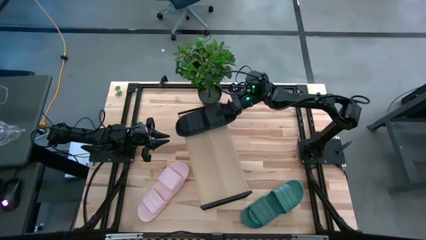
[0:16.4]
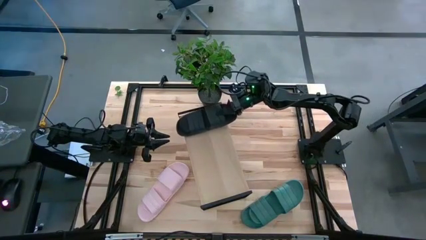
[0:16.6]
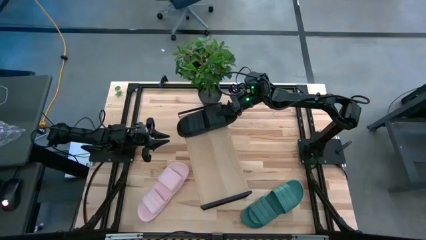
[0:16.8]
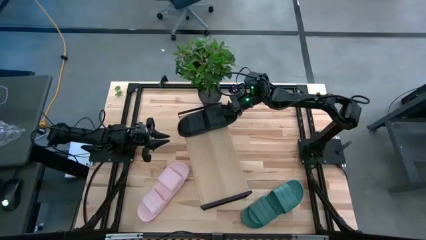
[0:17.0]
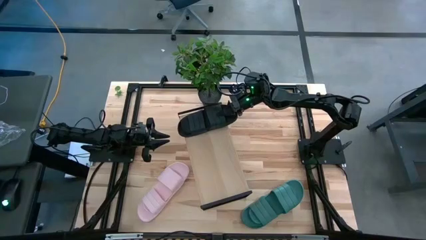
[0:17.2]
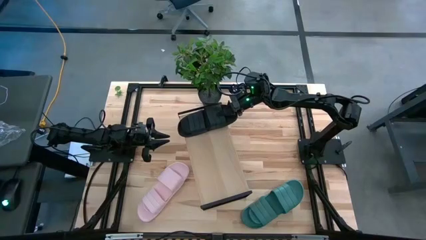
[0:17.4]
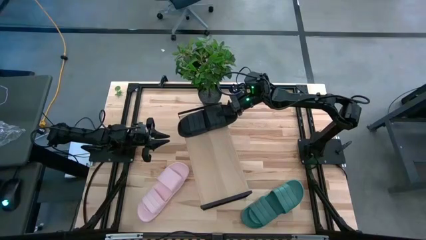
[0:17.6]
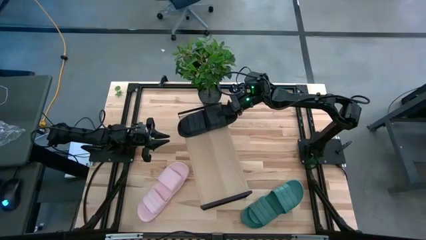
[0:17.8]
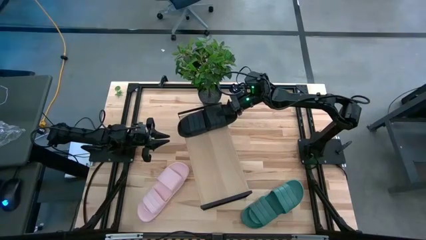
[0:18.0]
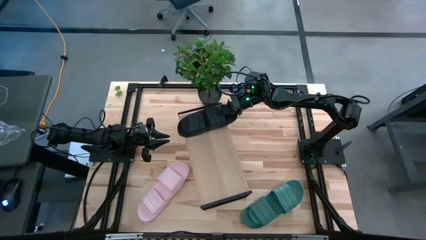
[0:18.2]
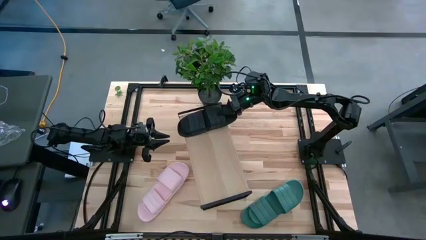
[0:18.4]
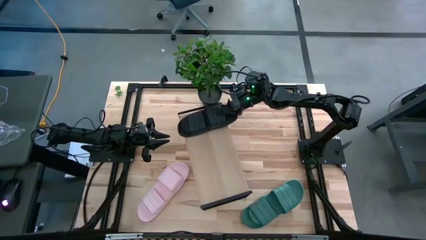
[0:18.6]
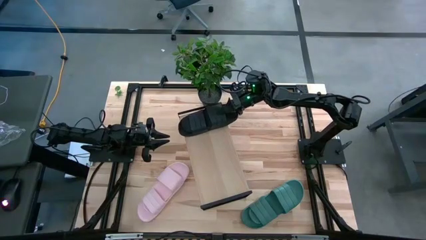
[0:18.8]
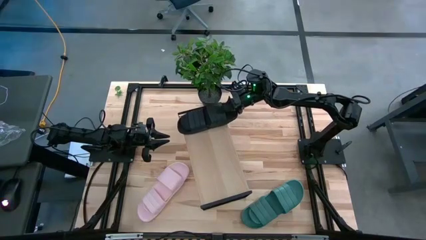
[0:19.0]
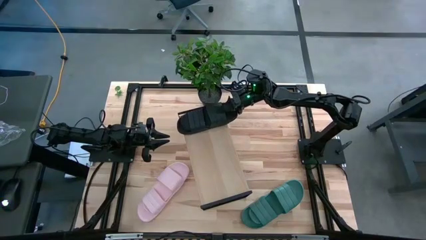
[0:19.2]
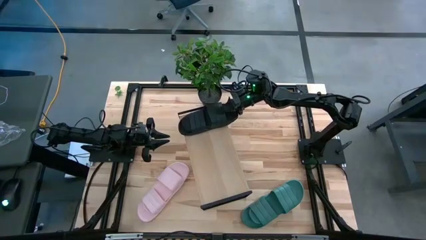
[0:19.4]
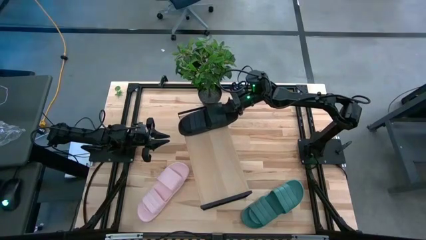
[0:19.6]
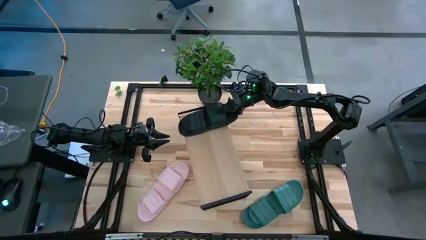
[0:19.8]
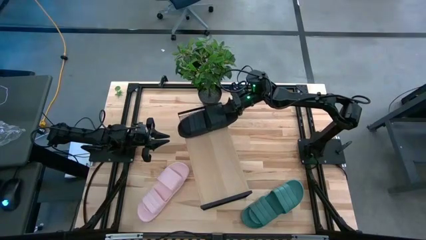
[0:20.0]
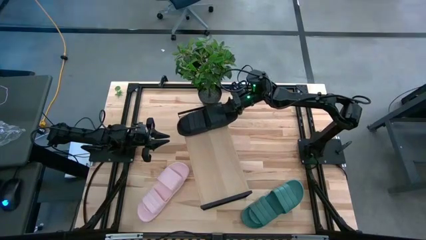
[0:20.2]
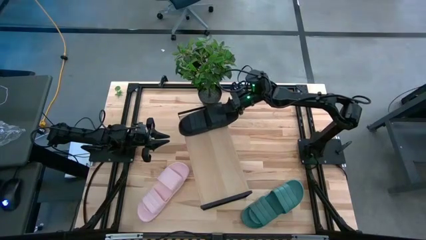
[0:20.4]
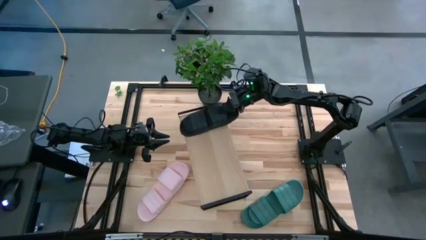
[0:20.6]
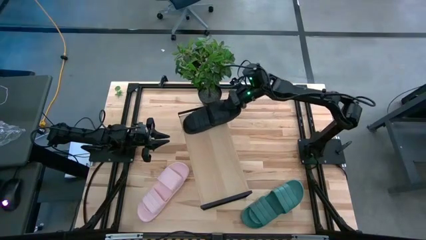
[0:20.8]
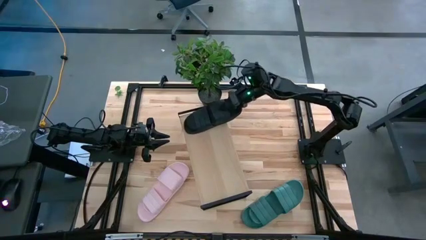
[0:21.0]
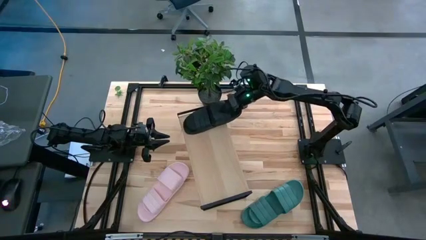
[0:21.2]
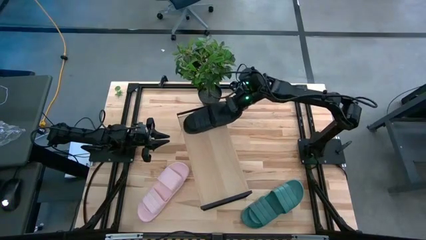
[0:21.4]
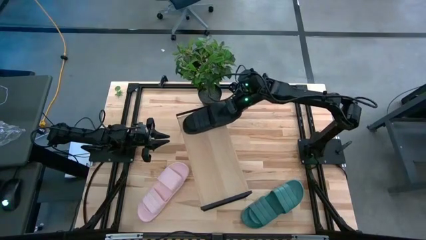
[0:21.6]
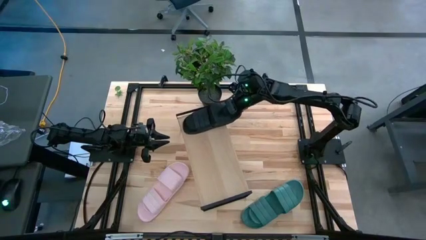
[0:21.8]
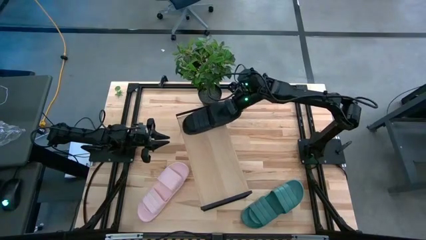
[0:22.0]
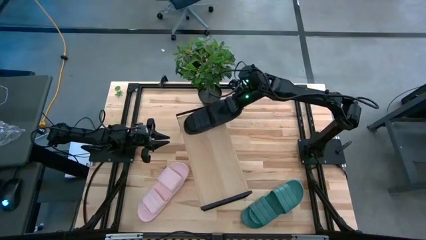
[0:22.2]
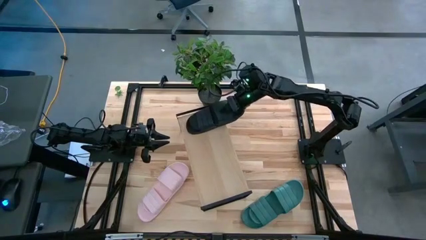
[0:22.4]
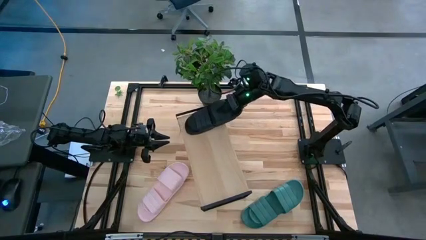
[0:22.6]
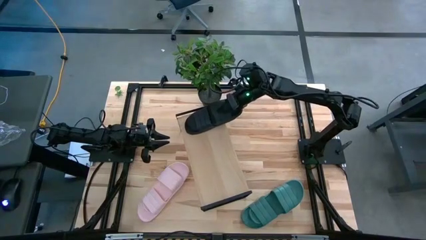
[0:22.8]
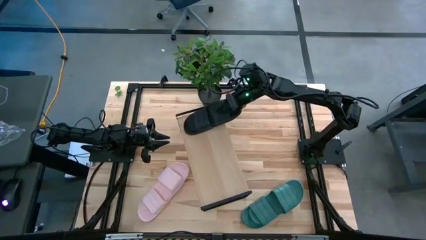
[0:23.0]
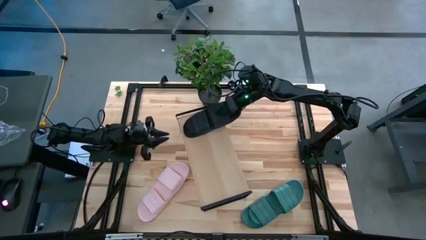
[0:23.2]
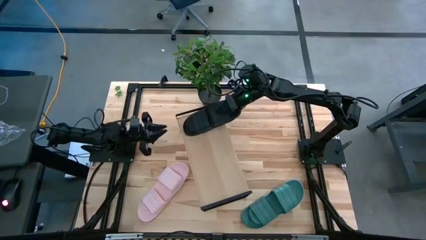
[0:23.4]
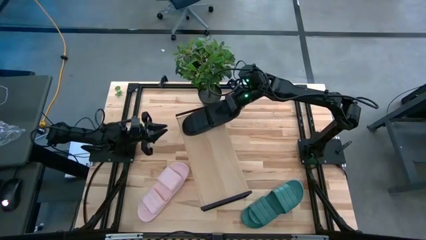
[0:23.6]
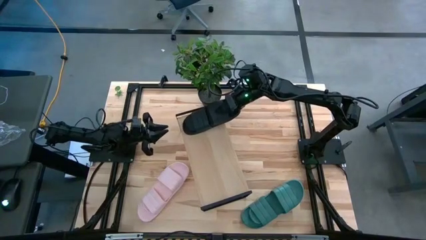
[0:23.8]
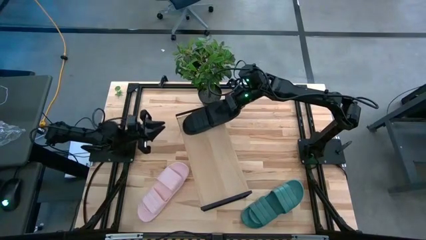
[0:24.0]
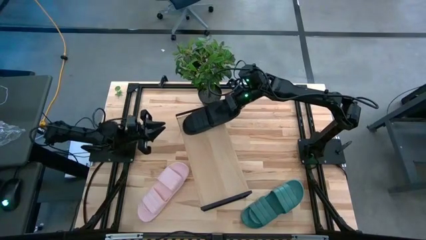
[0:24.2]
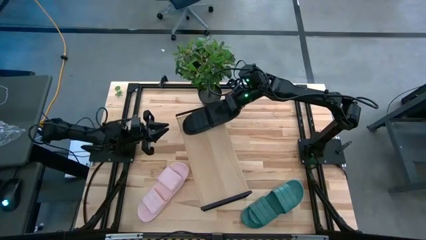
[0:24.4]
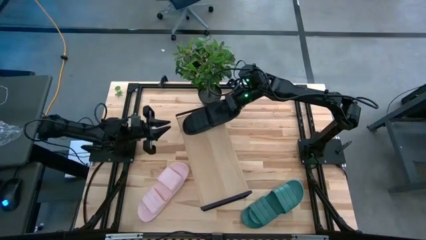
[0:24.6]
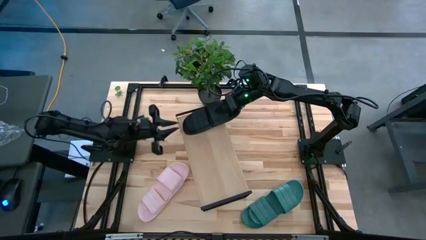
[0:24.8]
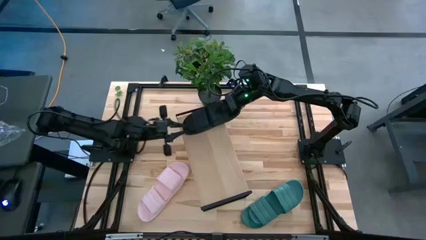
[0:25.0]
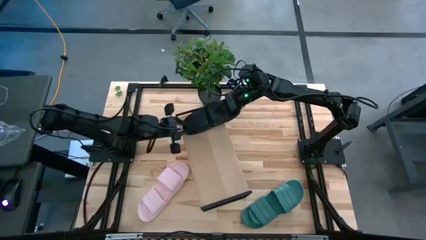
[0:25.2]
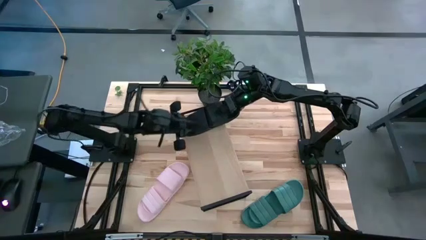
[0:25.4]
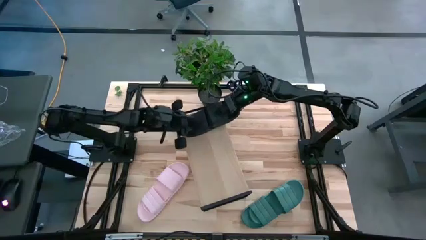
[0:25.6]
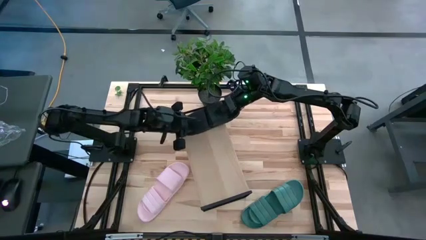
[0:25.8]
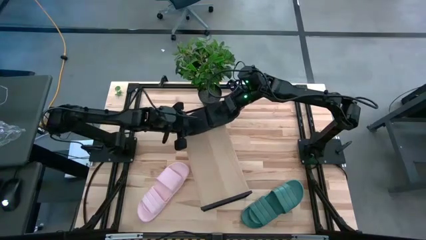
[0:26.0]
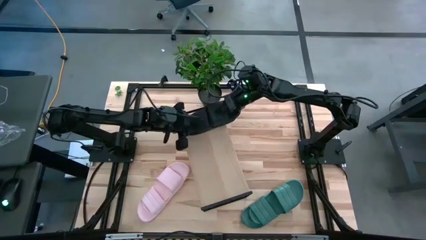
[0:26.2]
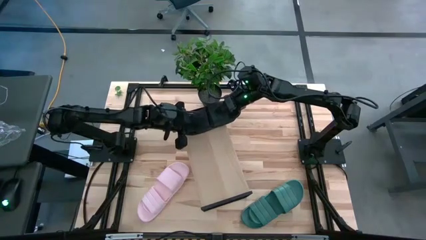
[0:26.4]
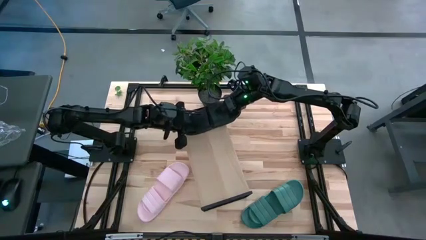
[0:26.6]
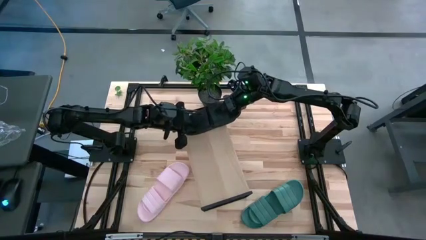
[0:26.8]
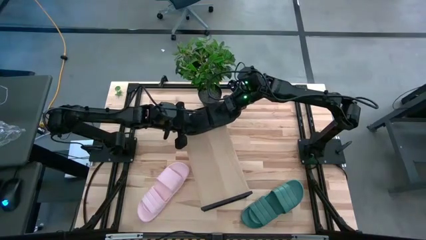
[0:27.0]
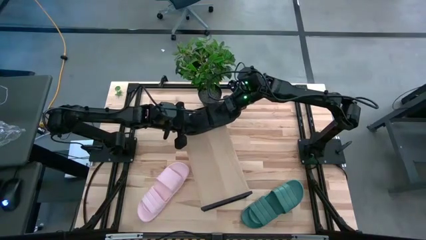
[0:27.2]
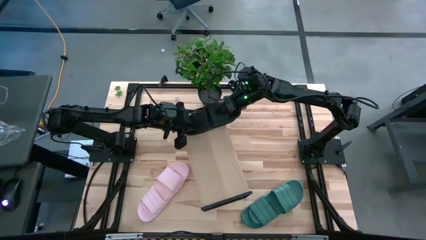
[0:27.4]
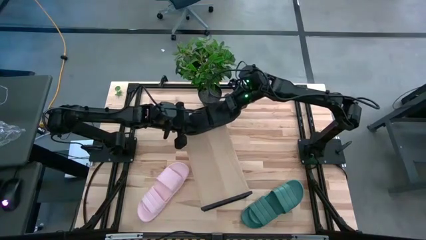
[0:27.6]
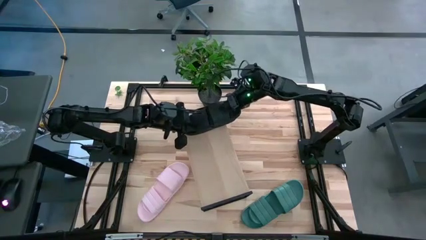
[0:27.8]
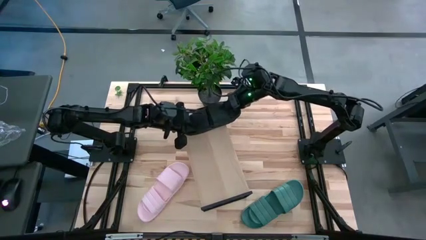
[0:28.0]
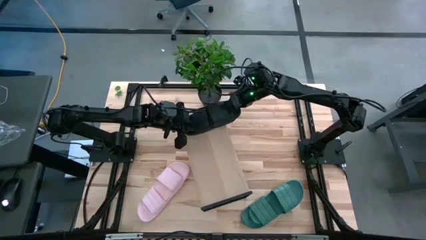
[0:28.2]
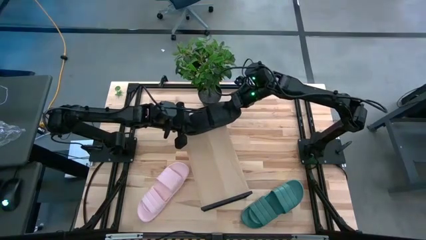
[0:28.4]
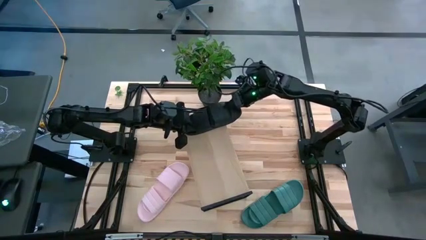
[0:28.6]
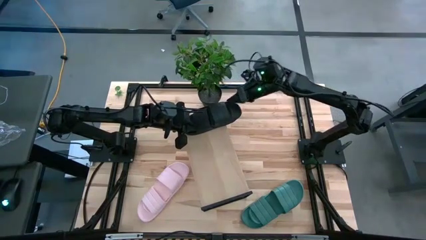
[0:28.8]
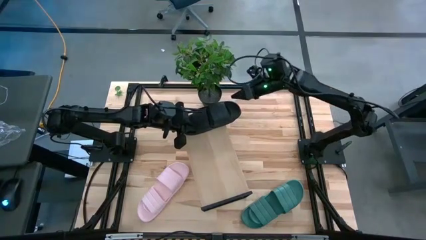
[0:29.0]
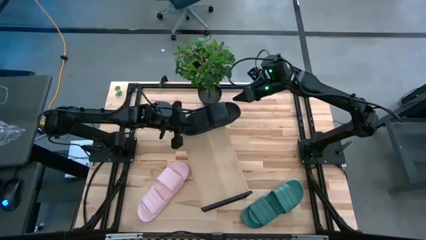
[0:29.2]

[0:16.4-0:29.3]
Task: Pick and place slides into the shelf
Put the black slides on the shelf
